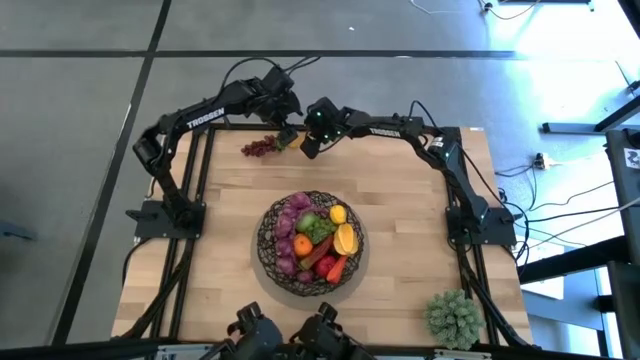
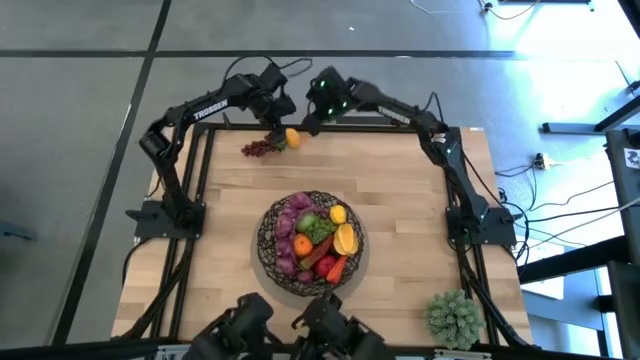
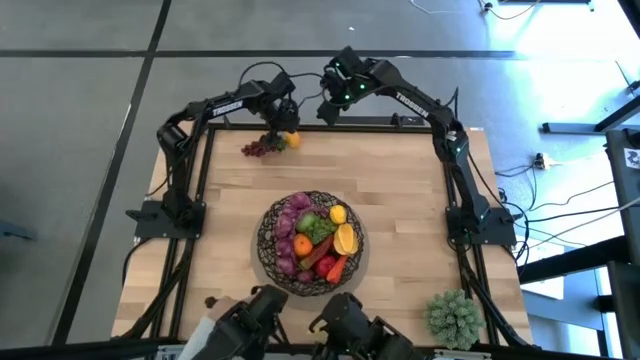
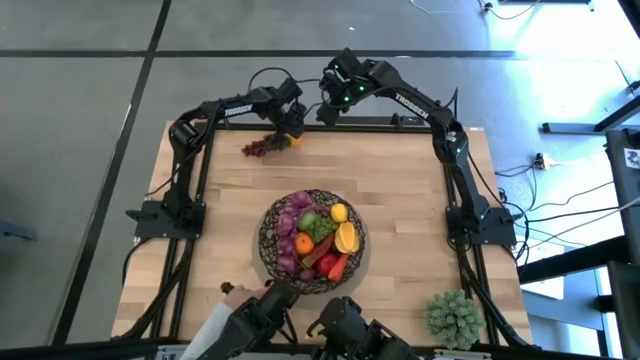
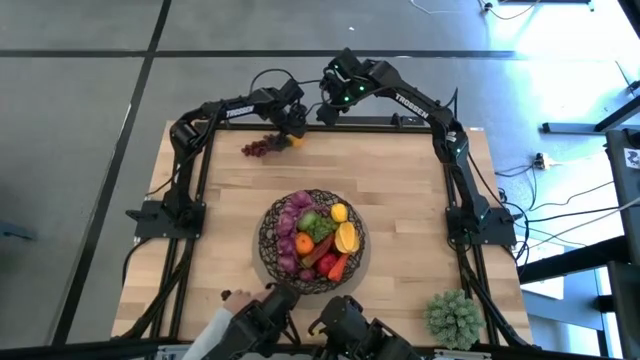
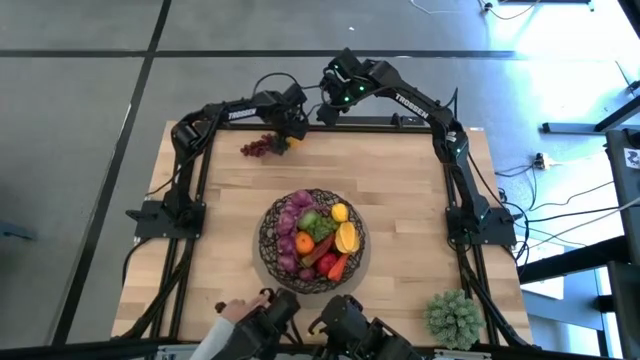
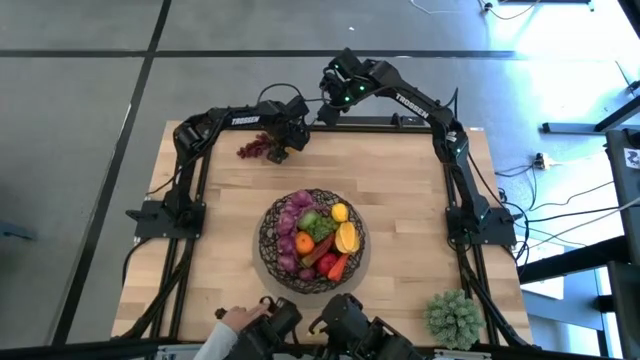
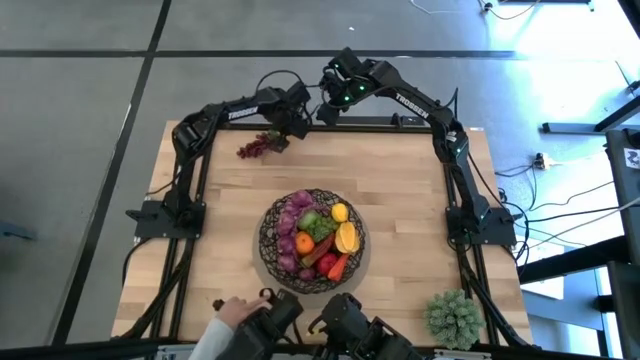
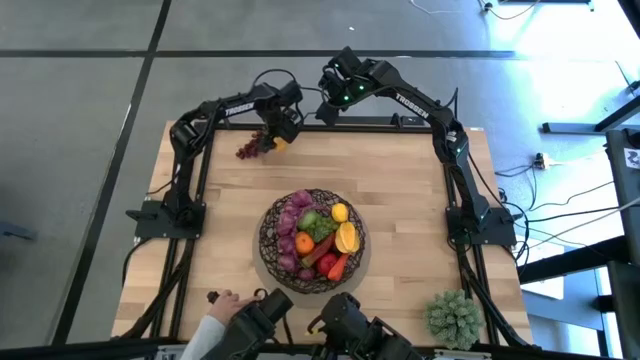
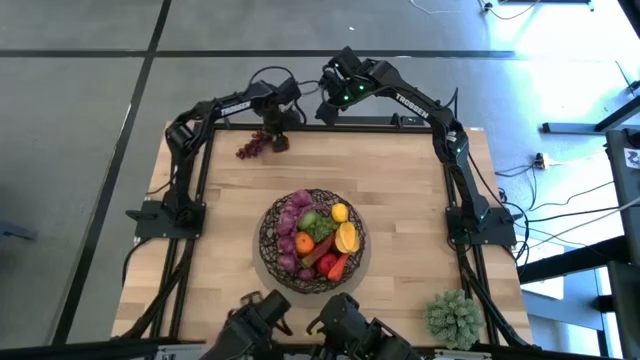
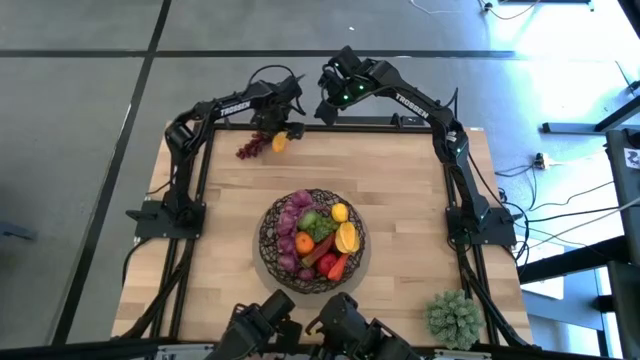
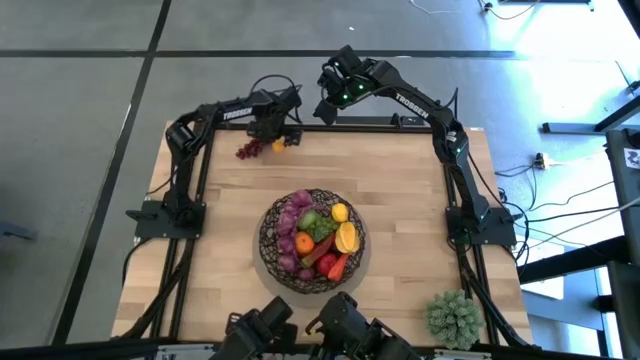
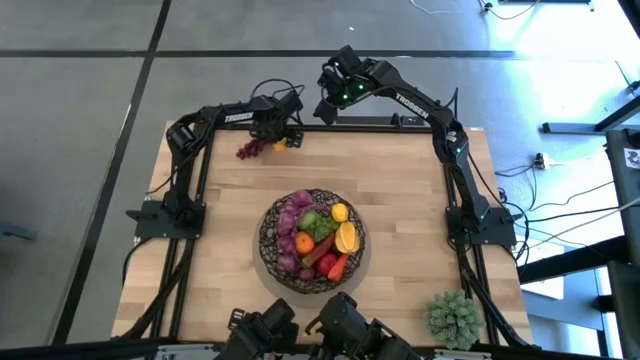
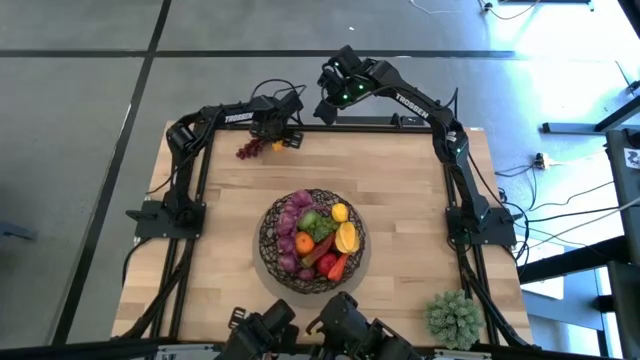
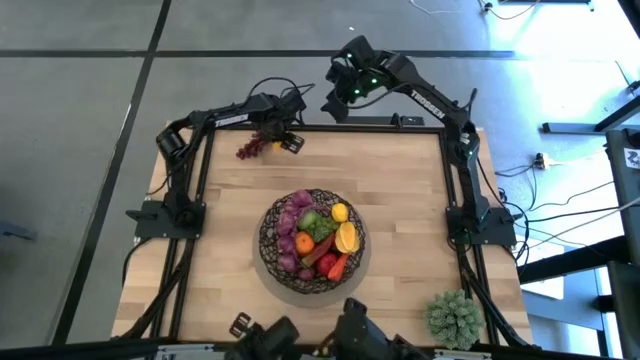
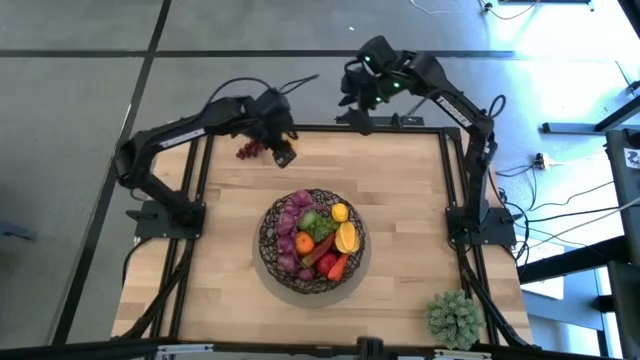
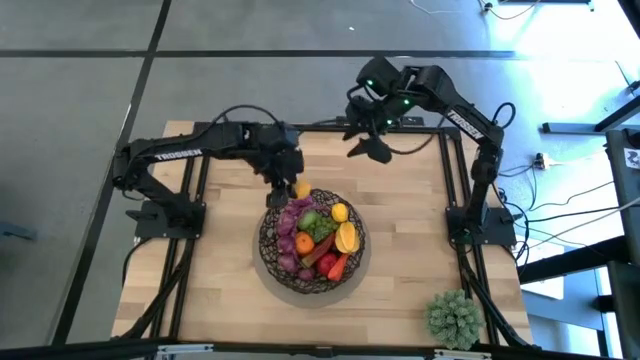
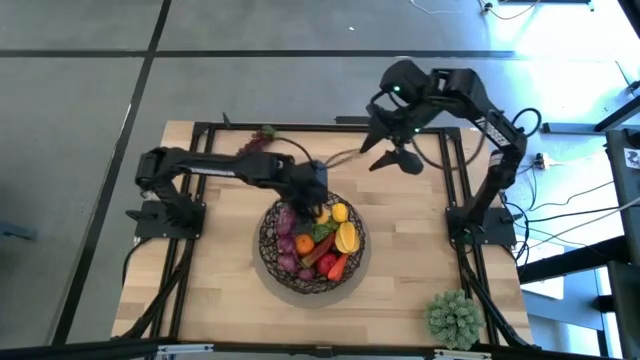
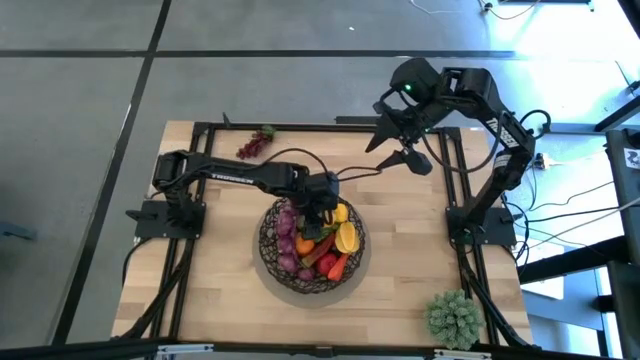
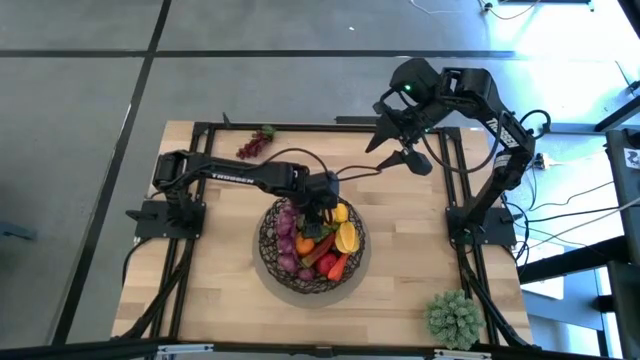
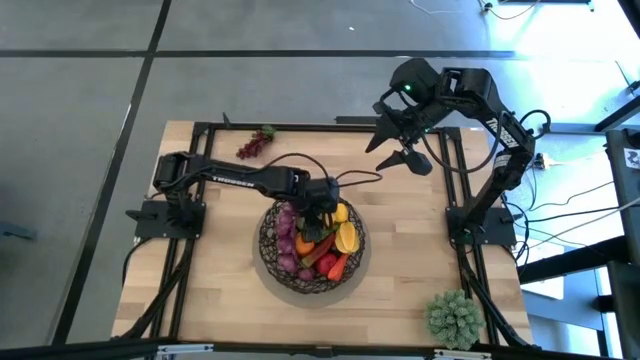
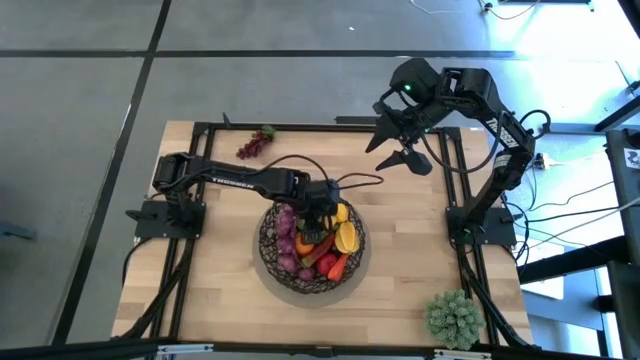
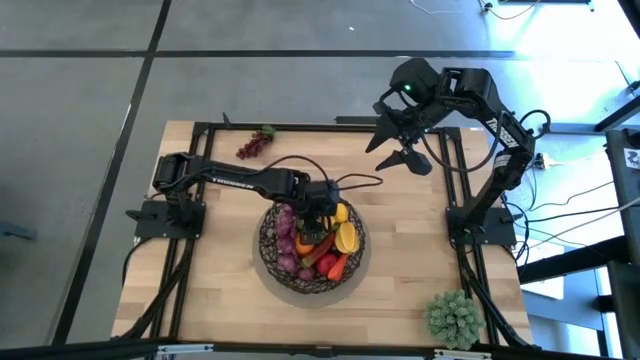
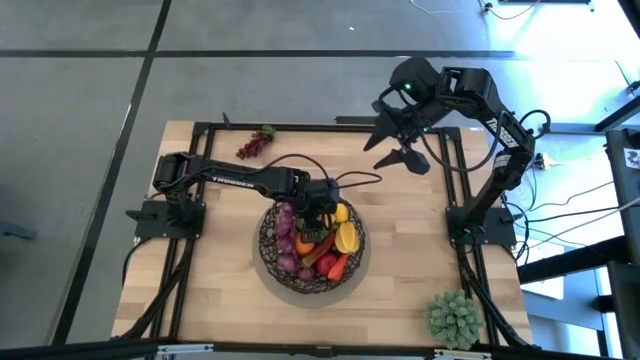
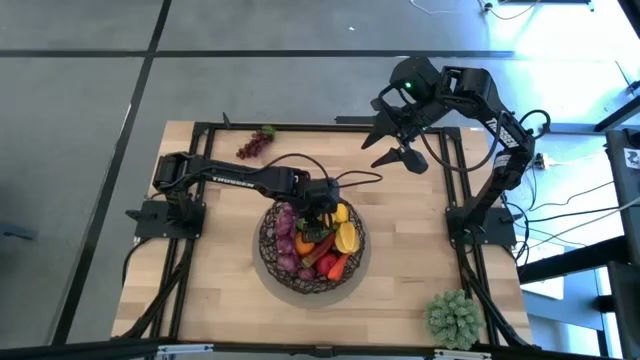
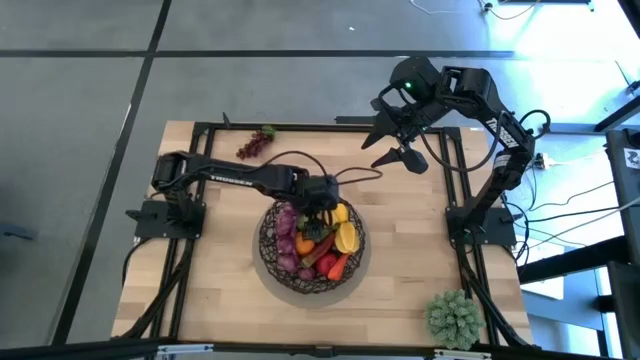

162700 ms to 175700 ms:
Task: Build produce basket
Put the lemon into the mesh basket

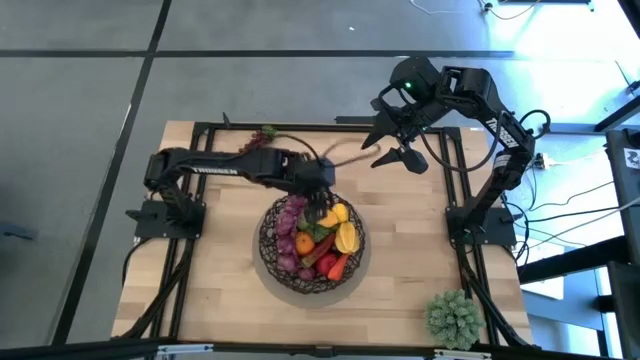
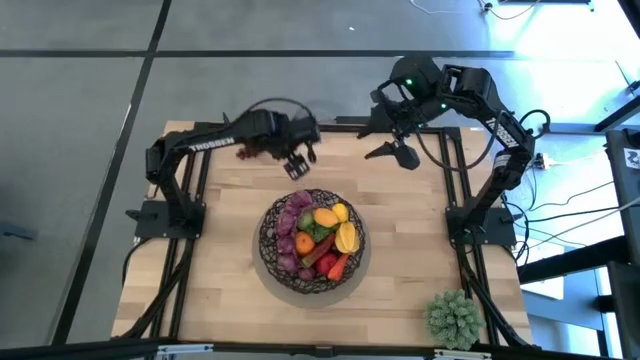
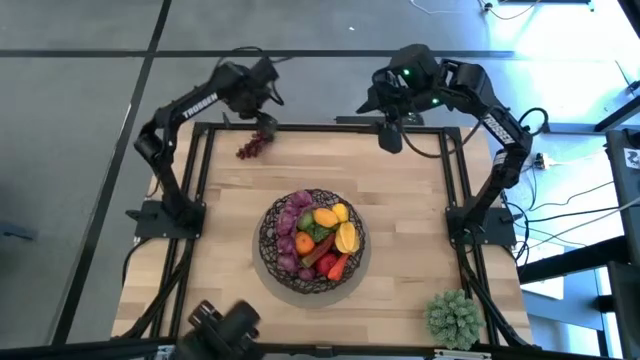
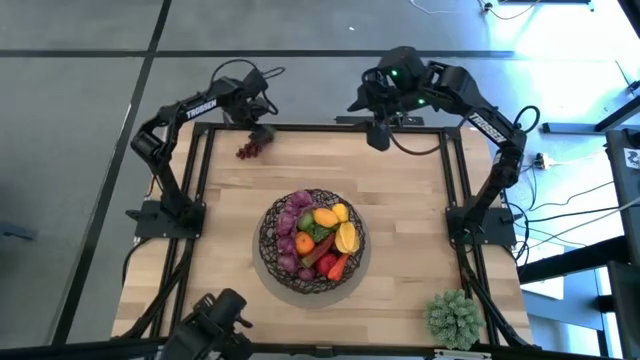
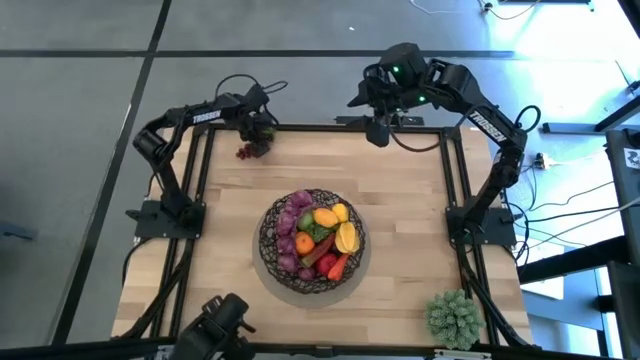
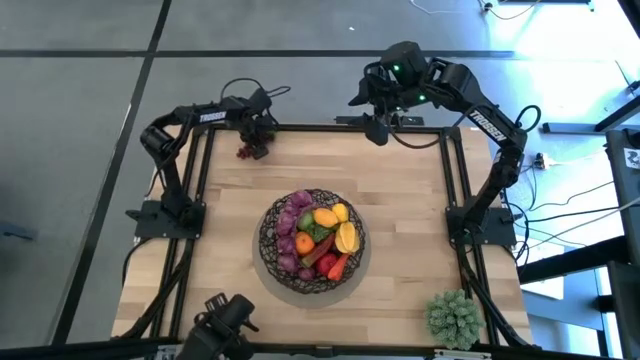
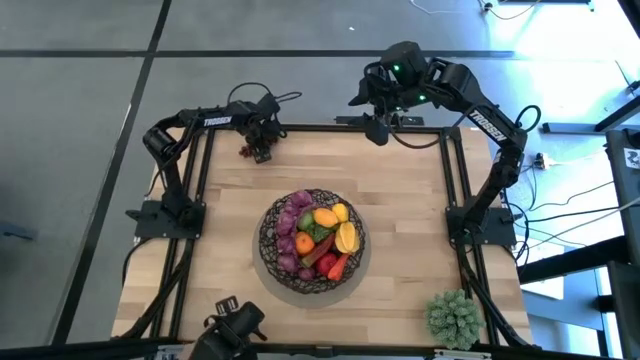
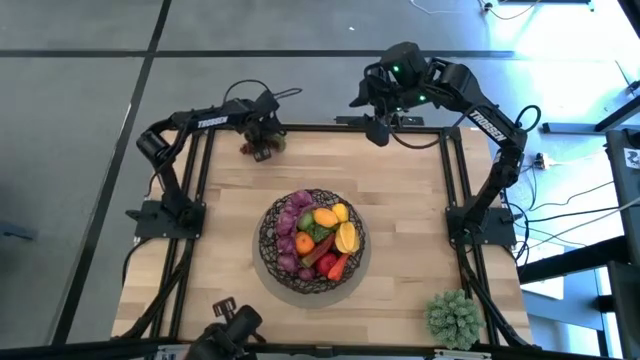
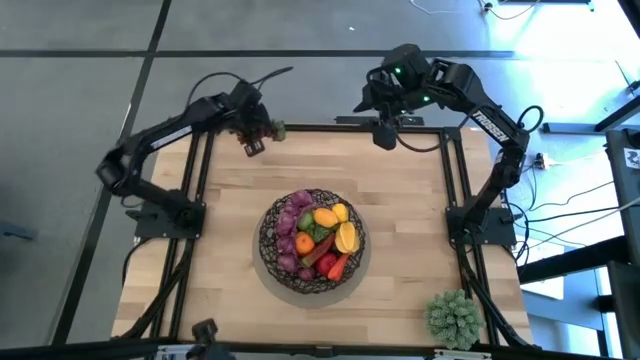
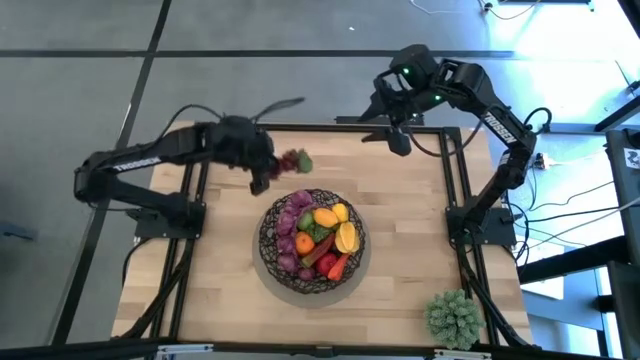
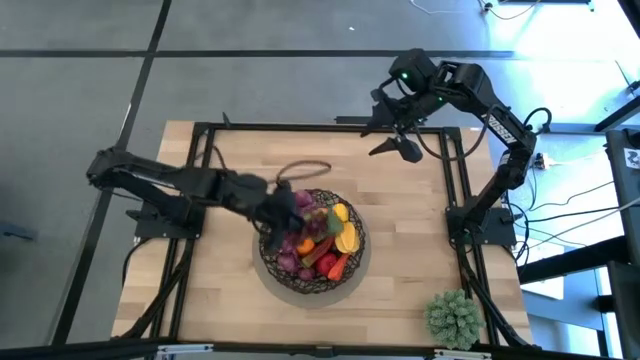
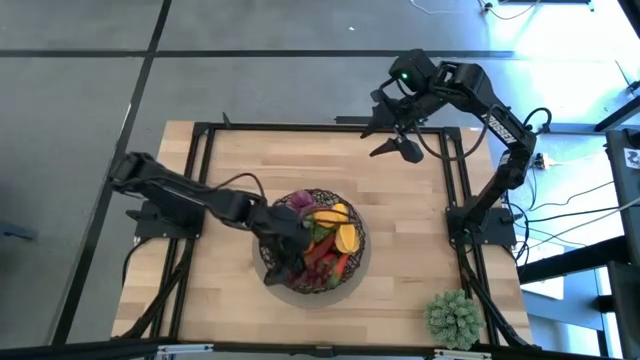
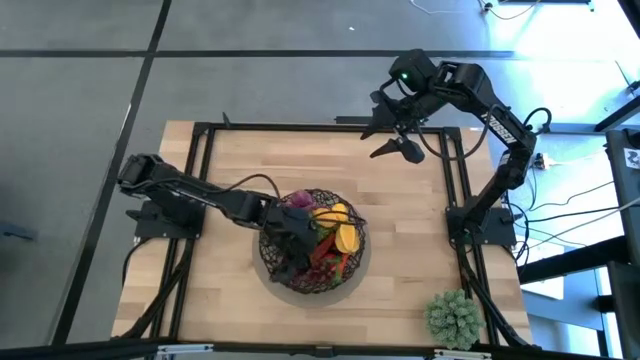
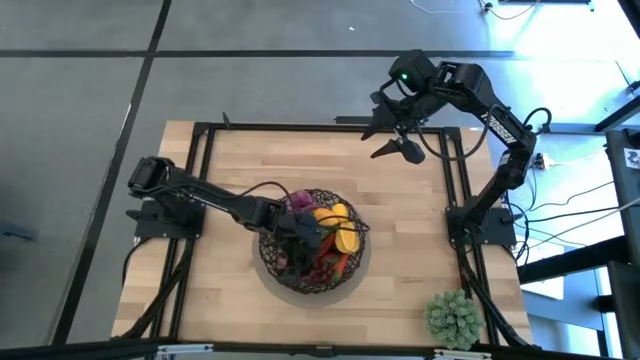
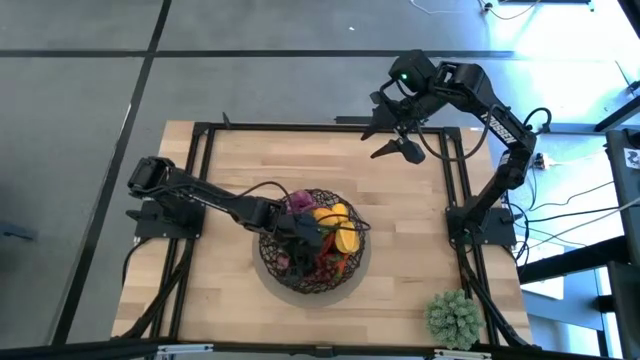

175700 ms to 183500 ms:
Put the red grapes into the mesh basket

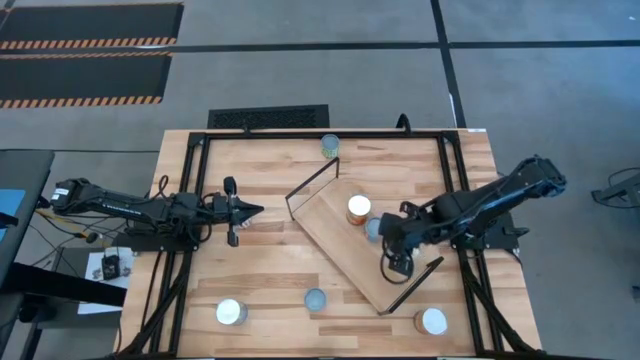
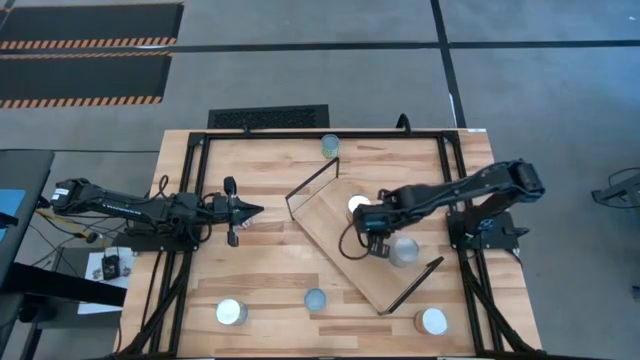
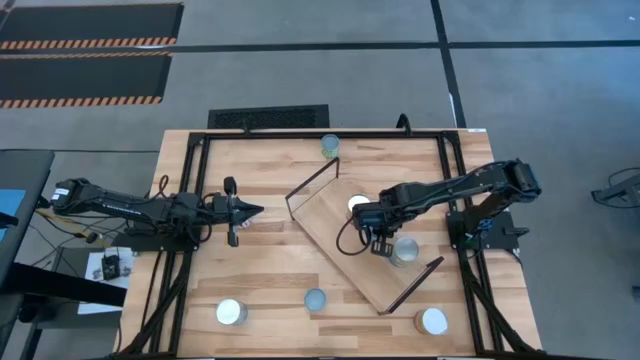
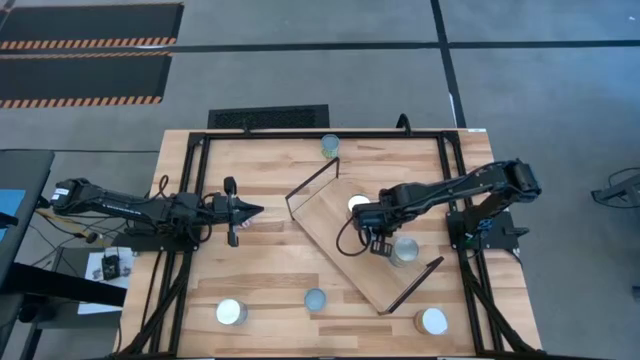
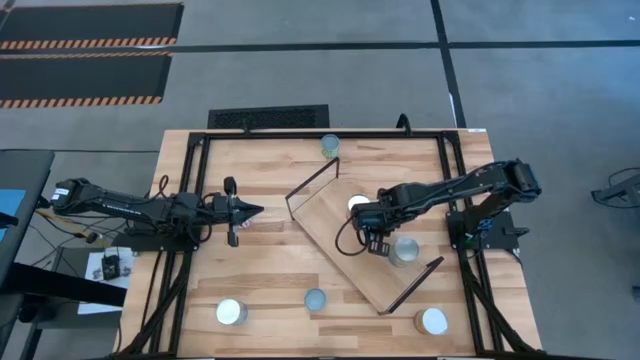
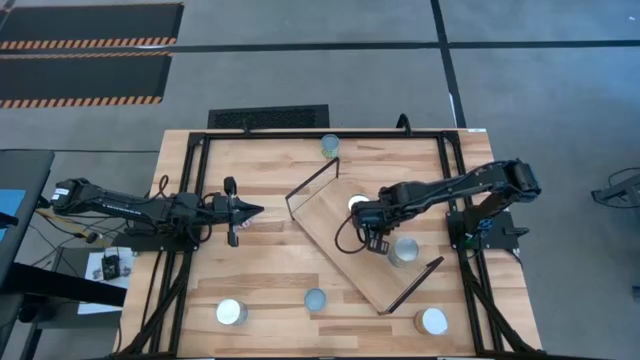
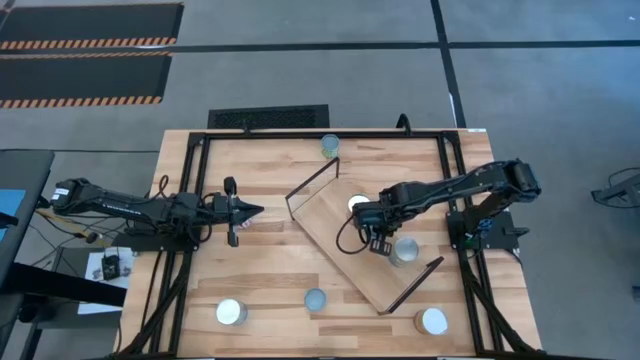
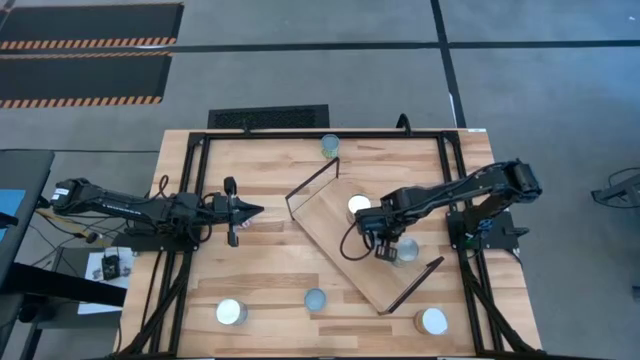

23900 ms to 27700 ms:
Task: Pick and place cans onto a shelf
Adjust the small canned corn on the shelf
